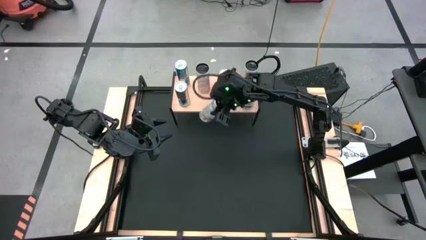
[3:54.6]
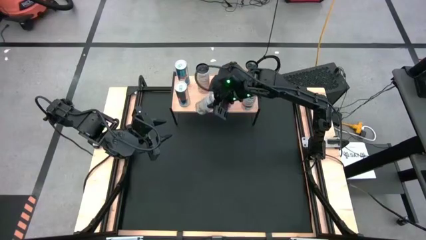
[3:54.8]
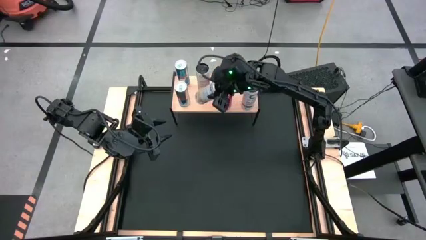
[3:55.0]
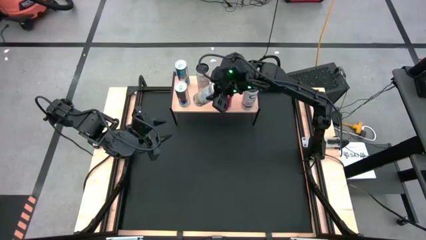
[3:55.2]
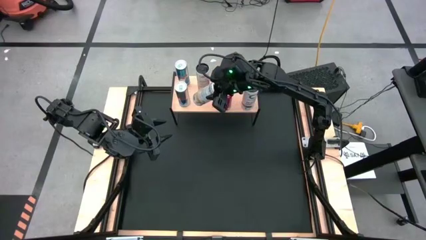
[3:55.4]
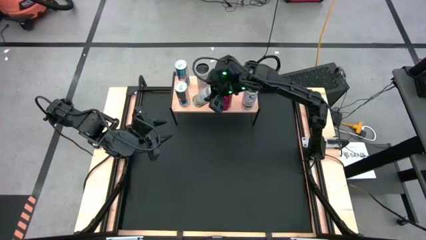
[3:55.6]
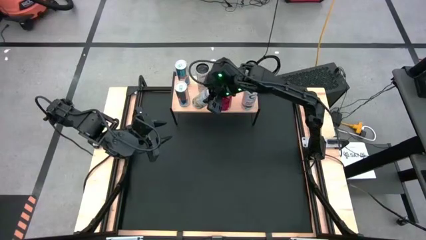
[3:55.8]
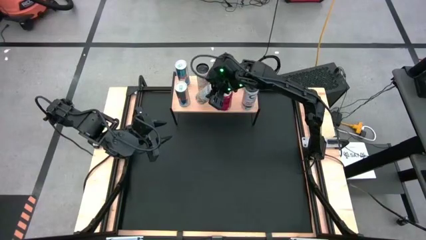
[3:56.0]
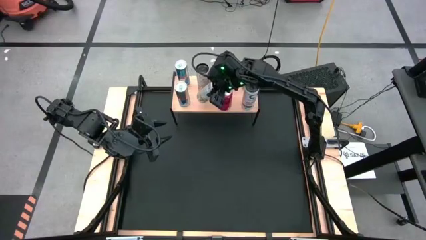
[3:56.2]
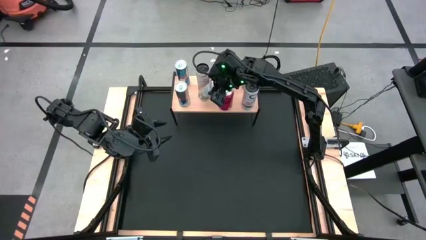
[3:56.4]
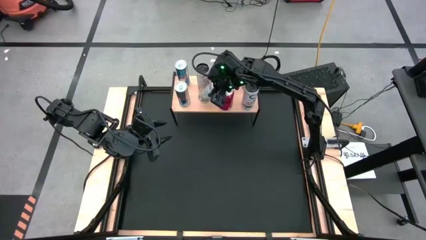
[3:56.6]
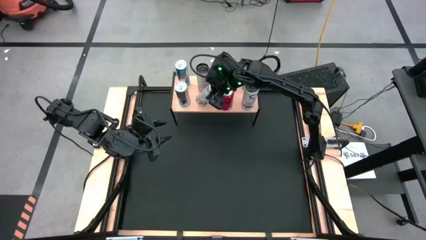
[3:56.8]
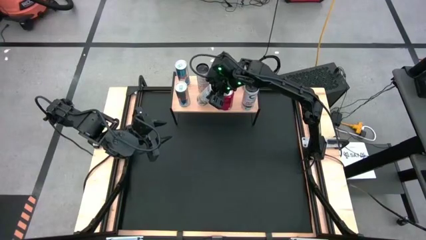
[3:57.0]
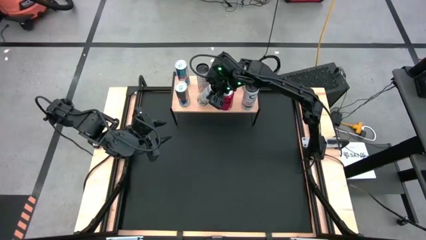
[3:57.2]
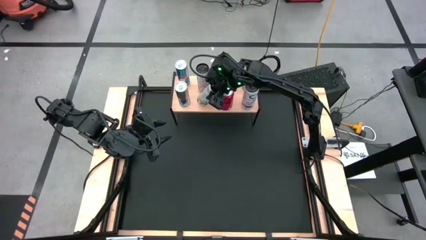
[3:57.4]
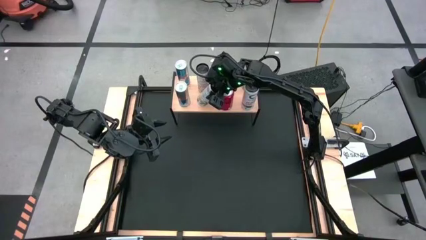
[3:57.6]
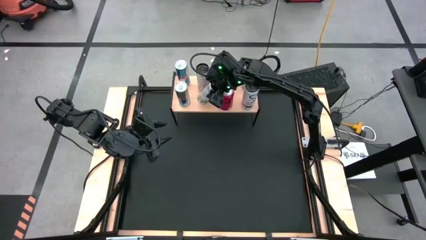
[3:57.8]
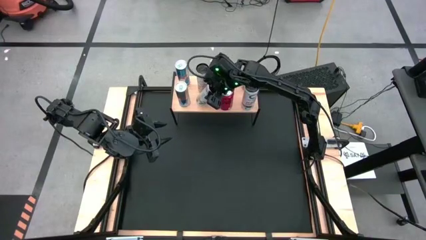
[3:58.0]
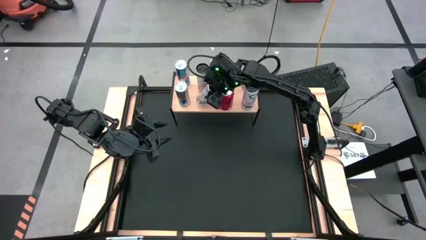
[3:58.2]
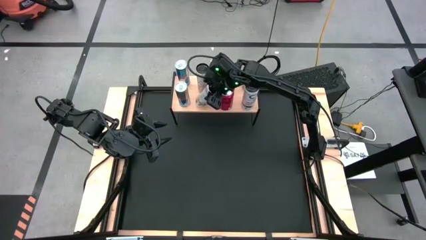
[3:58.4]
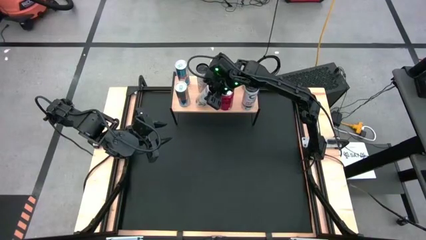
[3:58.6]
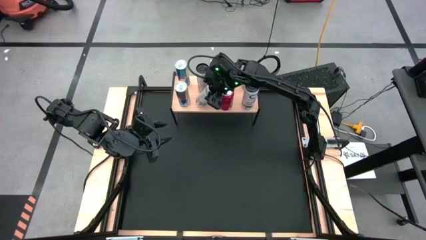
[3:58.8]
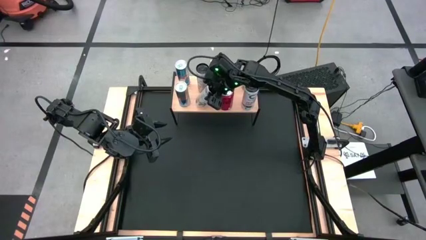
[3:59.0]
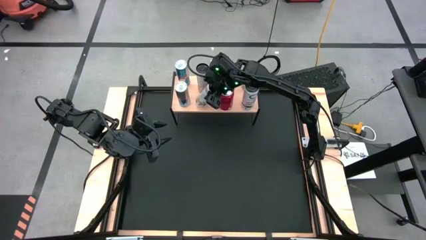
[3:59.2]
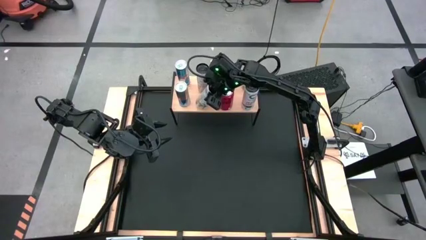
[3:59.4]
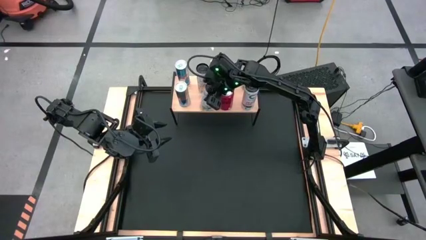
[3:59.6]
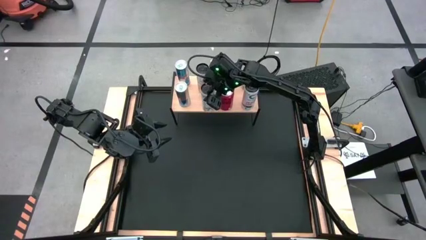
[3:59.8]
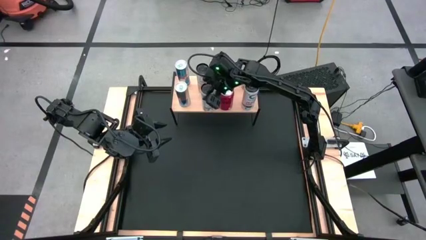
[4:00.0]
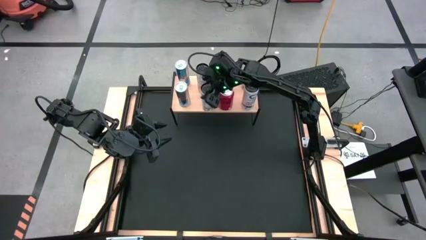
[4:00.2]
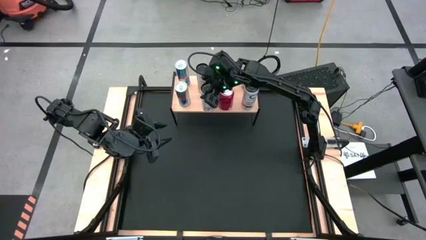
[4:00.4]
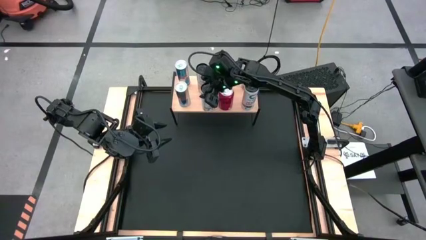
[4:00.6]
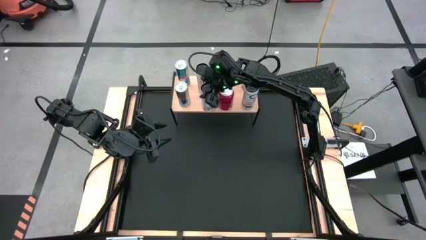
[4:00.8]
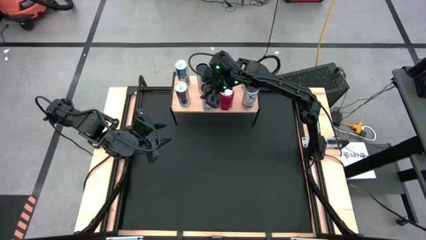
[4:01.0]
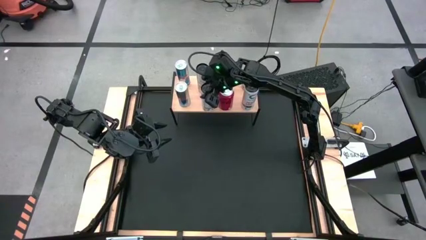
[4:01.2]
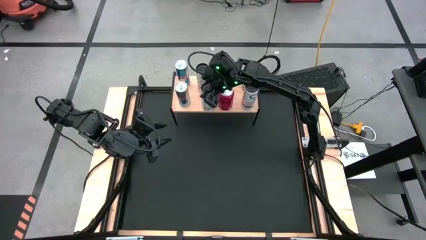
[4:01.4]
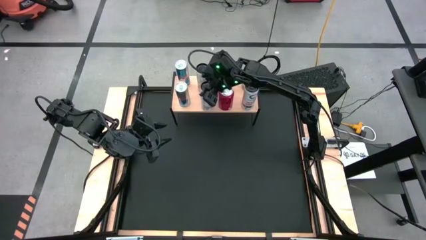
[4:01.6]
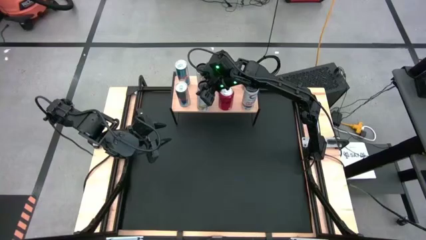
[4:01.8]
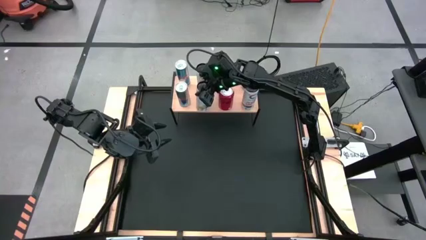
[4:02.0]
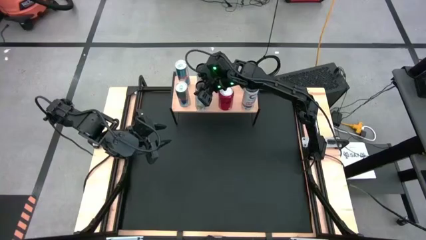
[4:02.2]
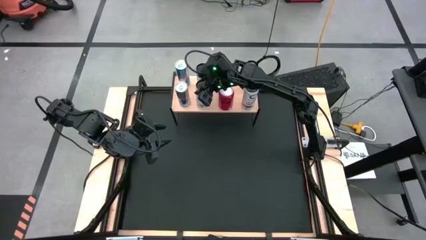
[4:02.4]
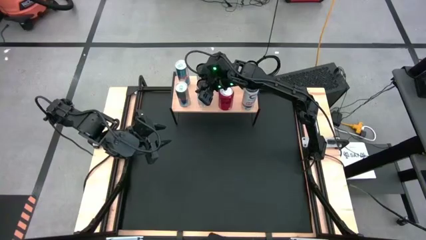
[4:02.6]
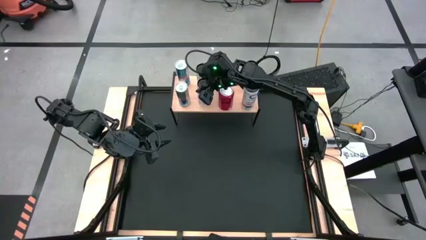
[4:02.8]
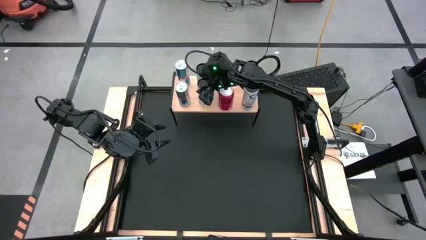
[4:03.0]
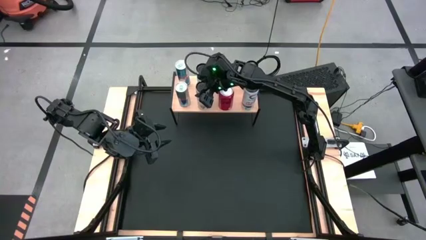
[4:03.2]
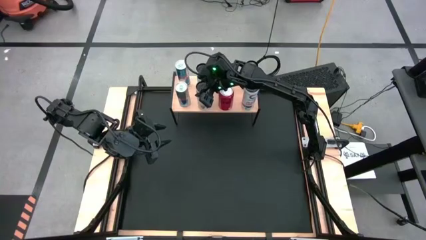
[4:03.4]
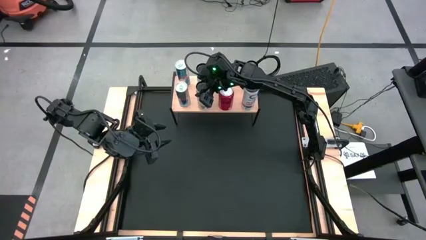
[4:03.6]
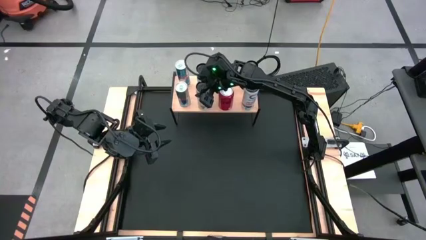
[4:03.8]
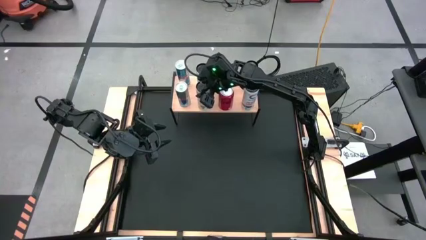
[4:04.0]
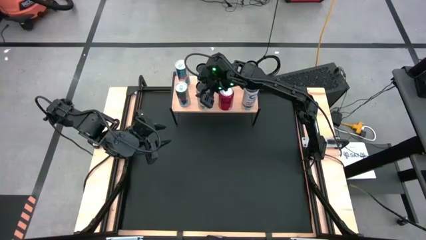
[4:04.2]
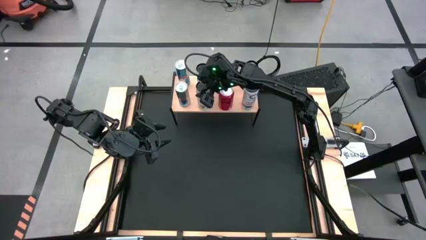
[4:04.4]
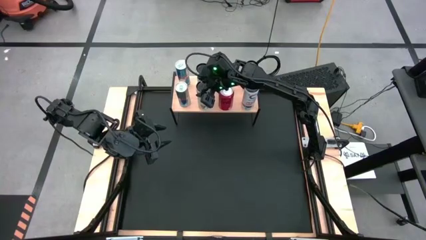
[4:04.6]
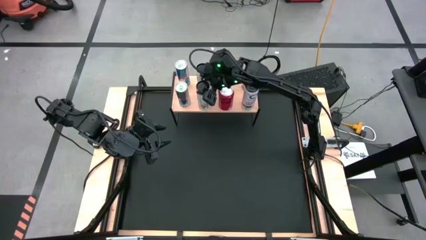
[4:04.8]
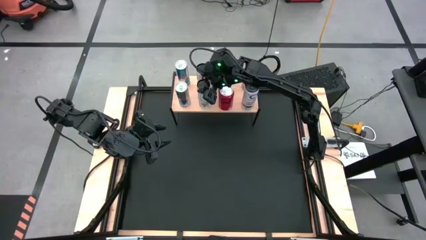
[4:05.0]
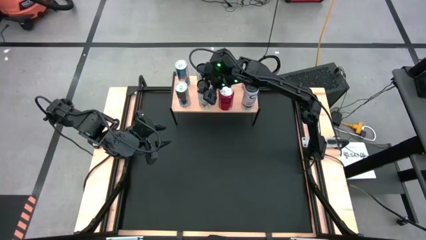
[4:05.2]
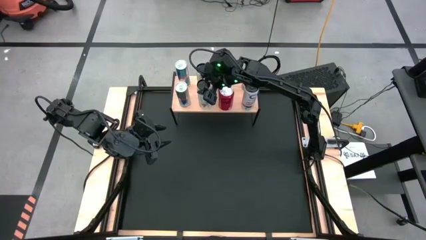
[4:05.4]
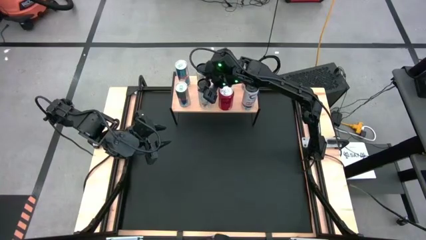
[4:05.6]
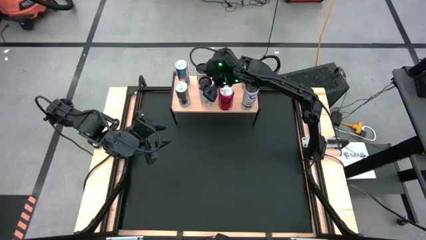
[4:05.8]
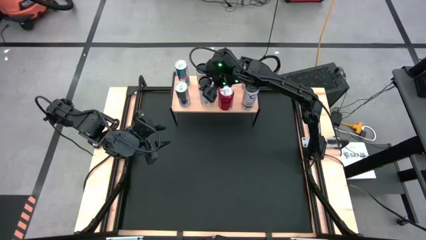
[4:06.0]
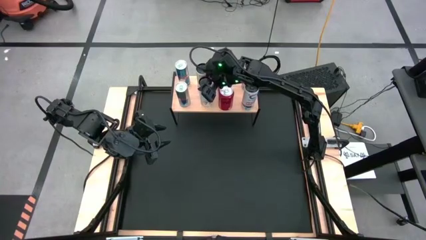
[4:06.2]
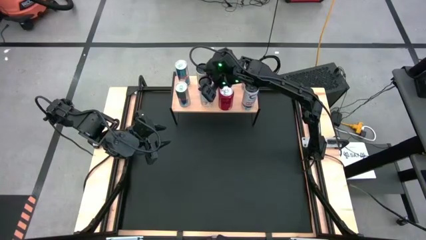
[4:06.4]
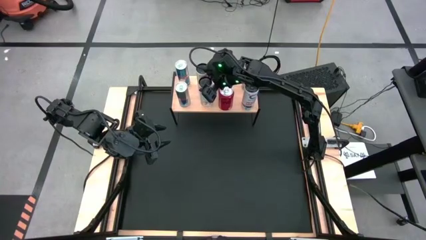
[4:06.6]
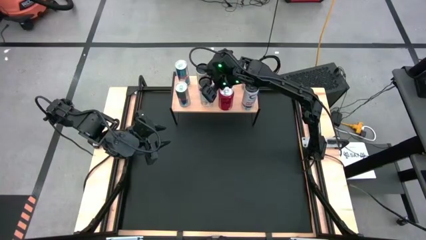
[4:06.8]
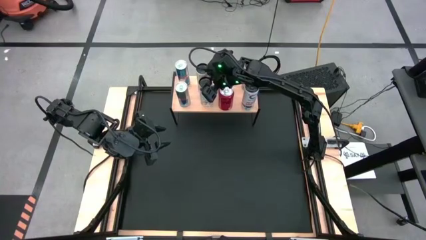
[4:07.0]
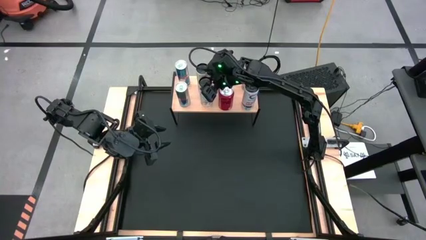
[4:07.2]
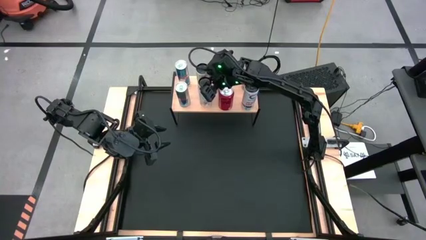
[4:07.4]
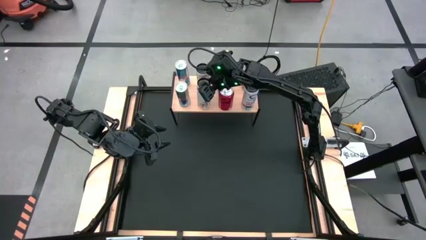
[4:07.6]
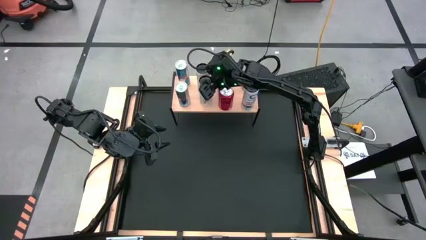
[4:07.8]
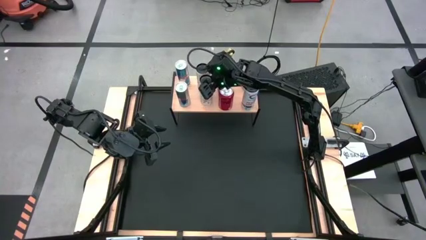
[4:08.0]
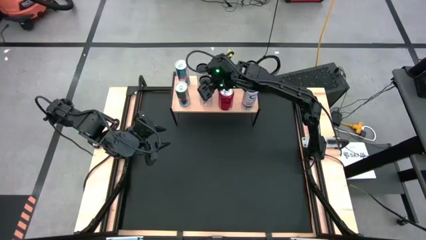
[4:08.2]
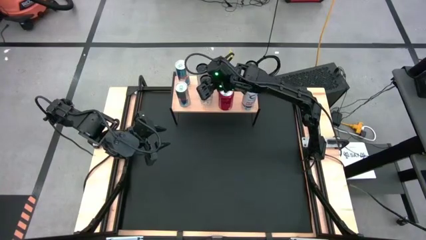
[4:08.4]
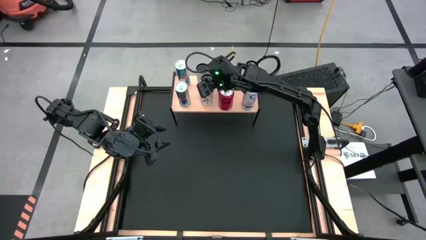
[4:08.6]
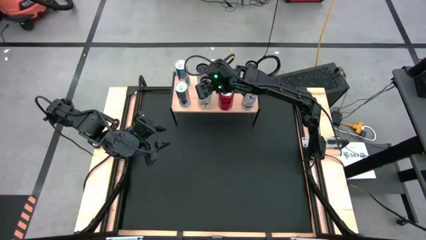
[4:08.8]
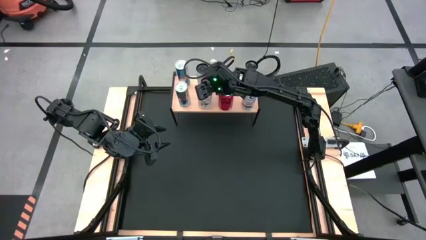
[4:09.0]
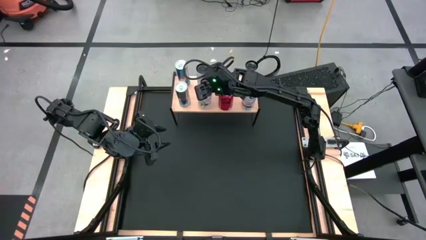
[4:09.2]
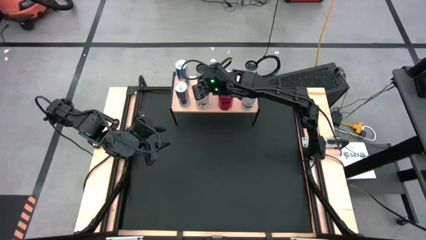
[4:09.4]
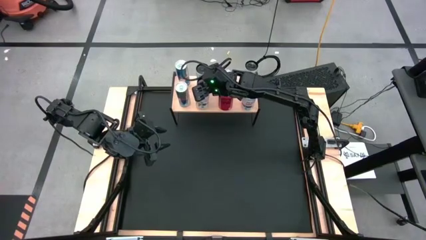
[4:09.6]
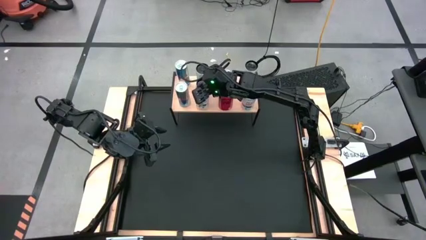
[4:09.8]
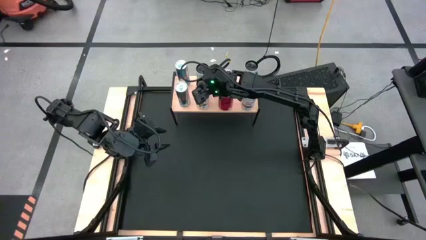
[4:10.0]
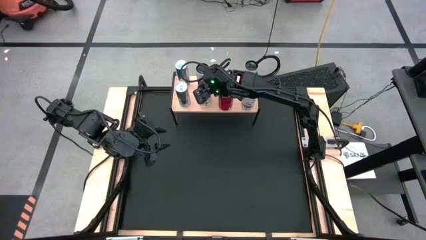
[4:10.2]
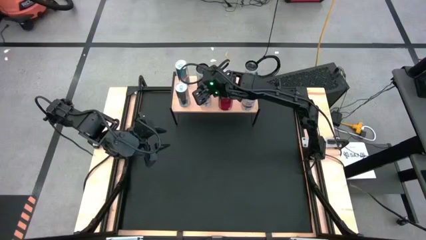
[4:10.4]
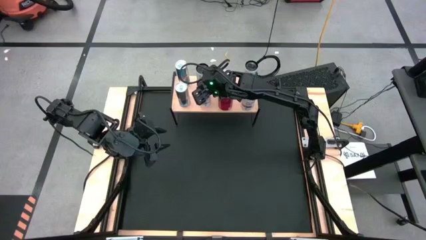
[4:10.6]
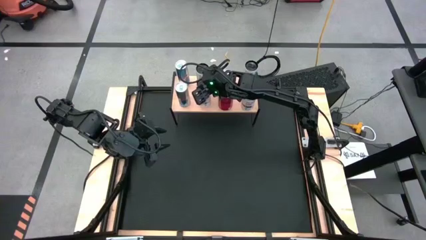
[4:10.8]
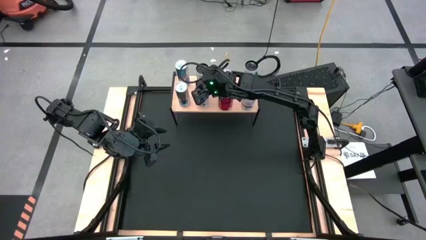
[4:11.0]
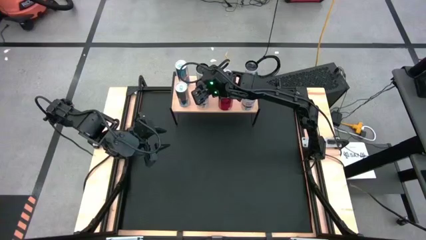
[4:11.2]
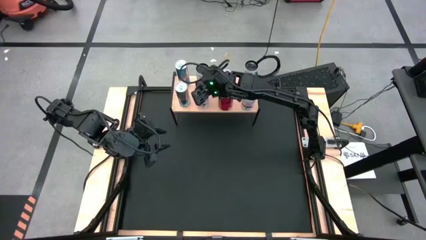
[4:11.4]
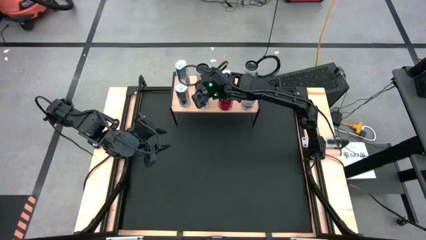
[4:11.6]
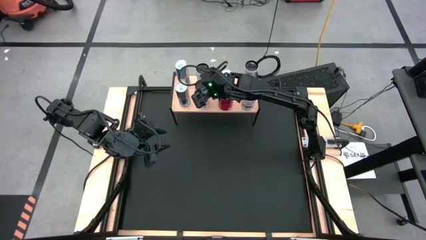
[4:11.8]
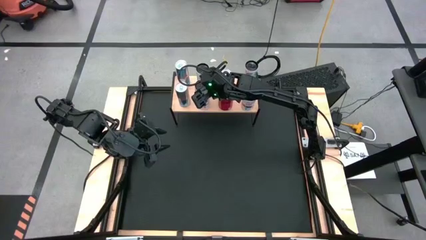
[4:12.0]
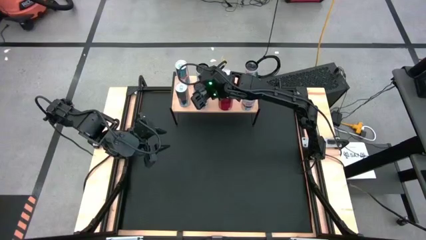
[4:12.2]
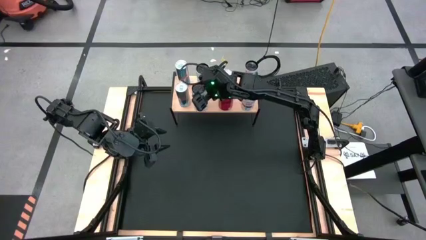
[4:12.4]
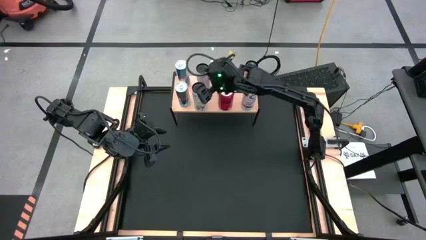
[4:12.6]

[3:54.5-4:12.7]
Task: Place canned beverage on shelf
Put the white orange soda can on the shelf aligned with the other white orange soda can
